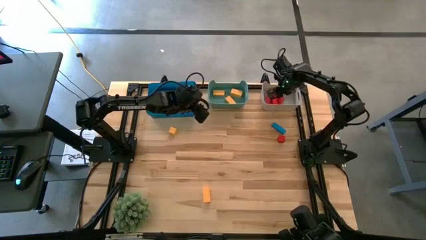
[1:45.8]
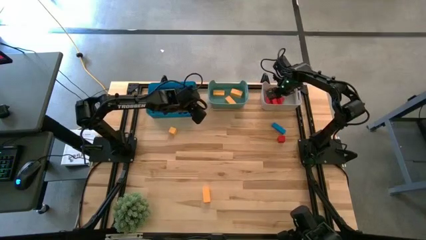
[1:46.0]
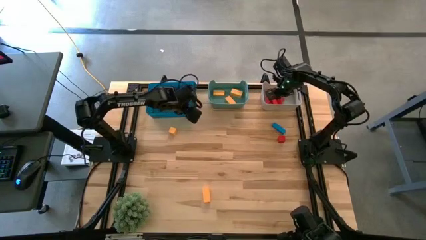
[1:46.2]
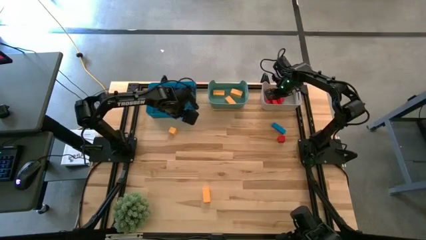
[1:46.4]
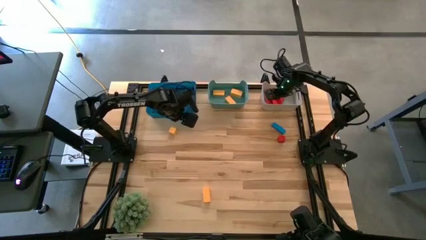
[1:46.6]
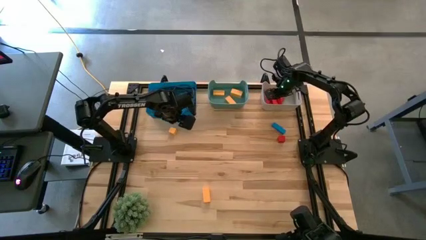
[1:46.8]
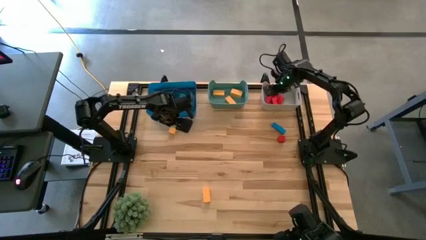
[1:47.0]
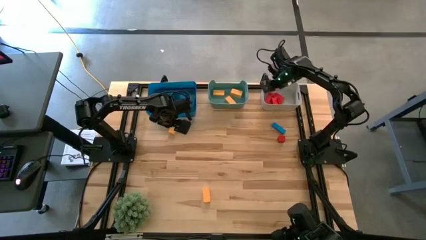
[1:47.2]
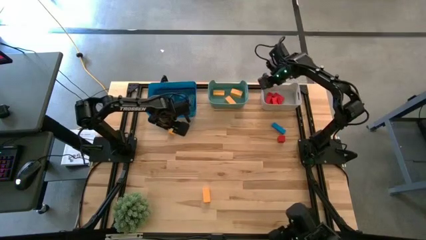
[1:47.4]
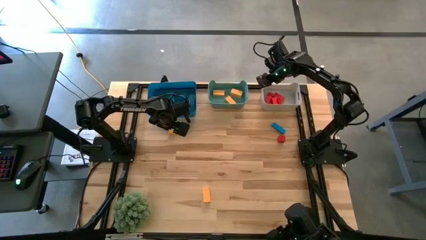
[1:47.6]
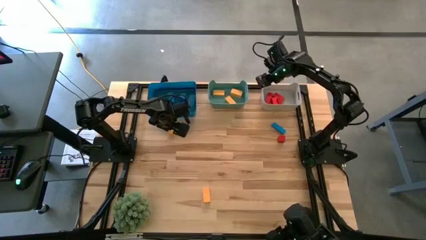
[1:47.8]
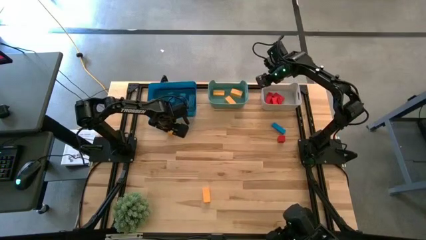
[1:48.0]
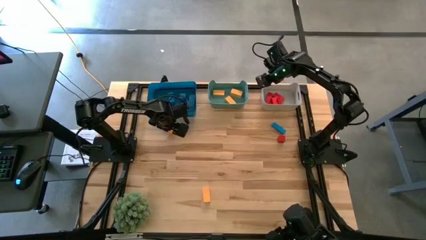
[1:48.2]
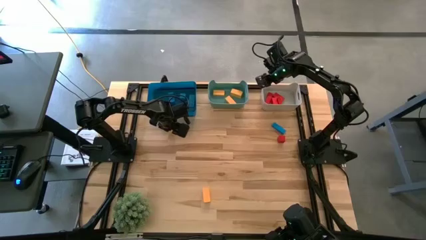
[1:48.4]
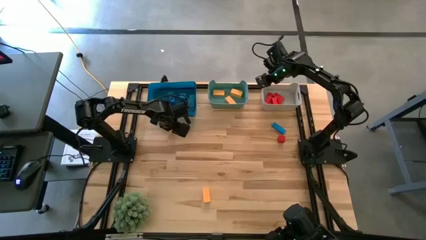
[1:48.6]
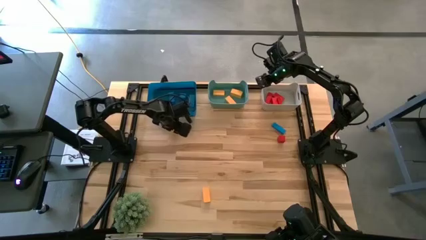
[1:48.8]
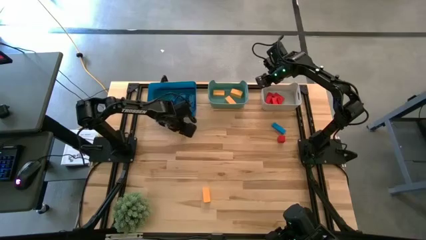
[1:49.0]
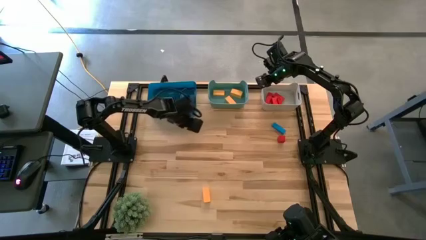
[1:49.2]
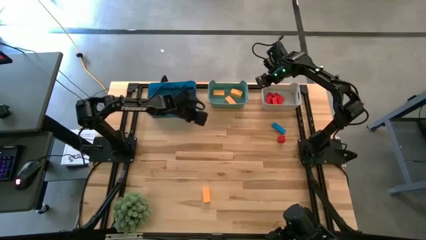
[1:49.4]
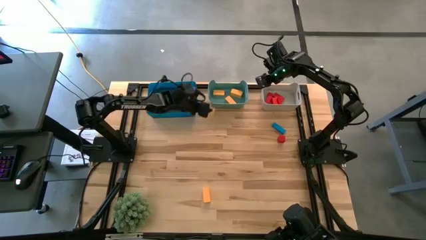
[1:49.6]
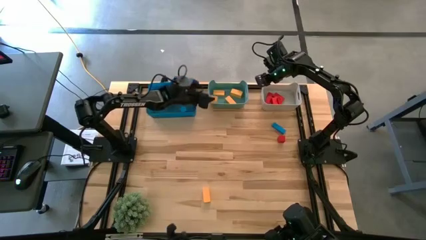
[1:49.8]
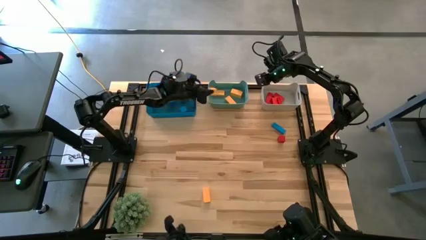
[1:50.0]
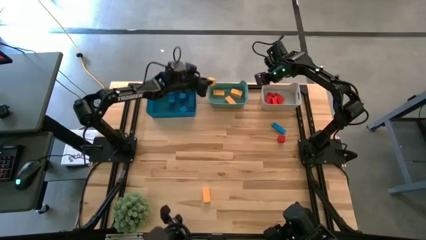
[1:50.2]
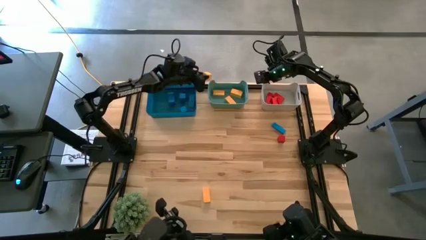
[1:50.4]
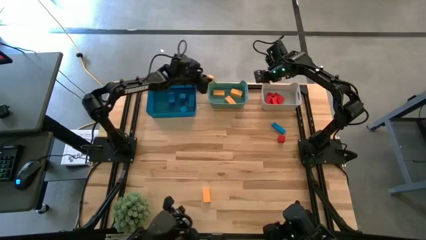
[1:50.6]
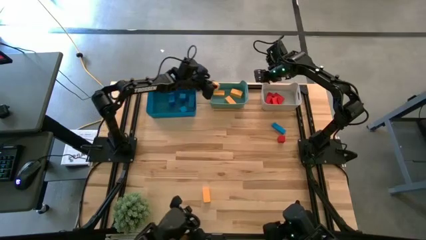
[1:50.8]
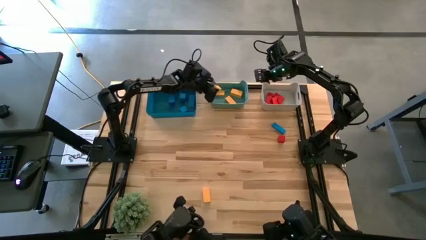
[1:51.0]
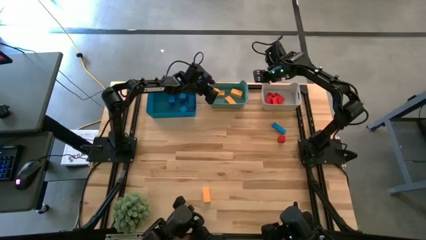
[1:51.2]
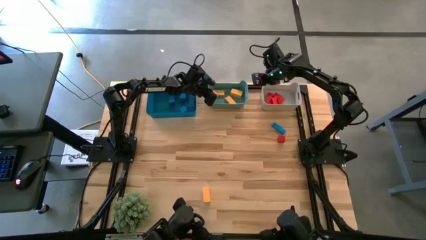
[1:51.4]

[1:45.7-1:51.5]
Task: Sort & place blocks by color
Put the yellow block into the green bin

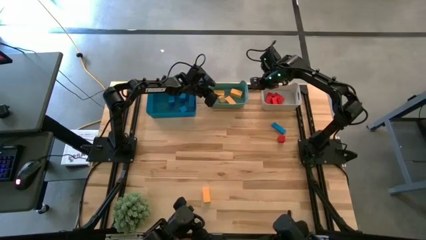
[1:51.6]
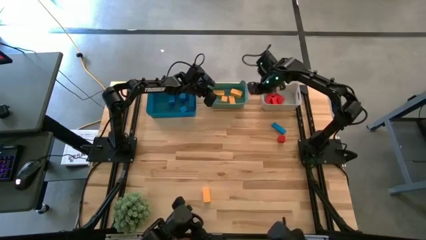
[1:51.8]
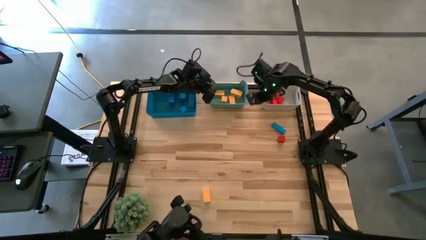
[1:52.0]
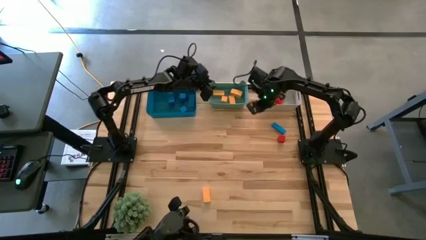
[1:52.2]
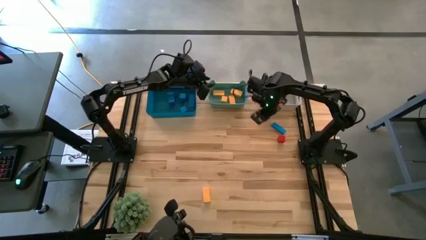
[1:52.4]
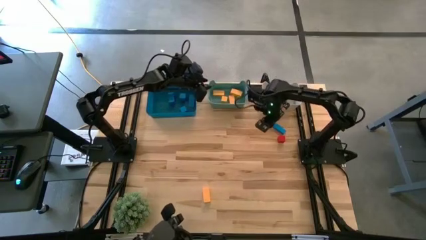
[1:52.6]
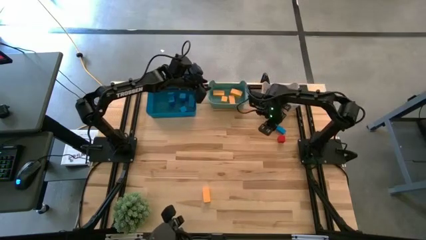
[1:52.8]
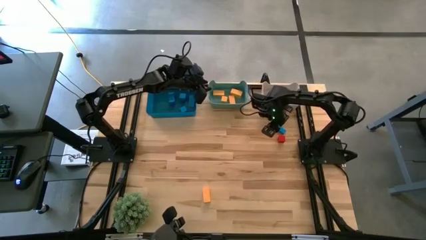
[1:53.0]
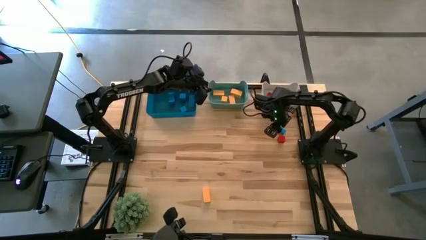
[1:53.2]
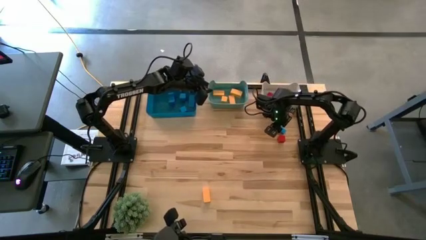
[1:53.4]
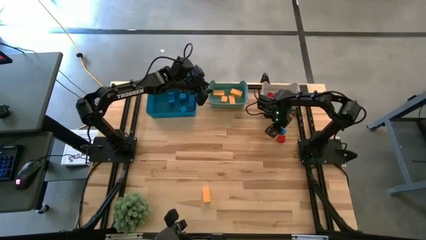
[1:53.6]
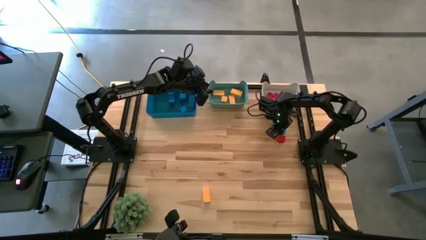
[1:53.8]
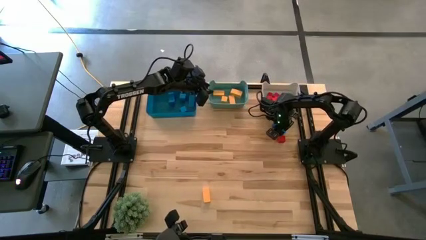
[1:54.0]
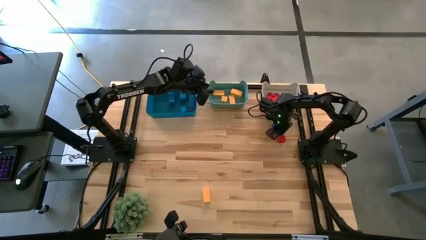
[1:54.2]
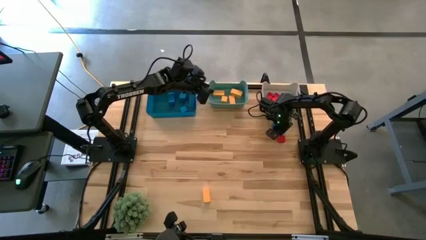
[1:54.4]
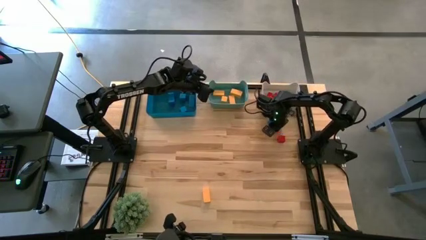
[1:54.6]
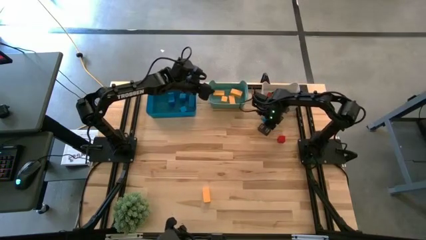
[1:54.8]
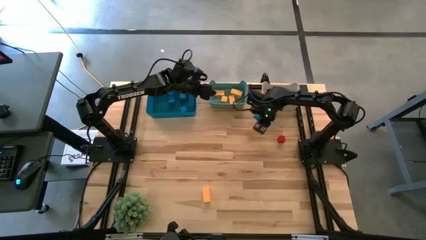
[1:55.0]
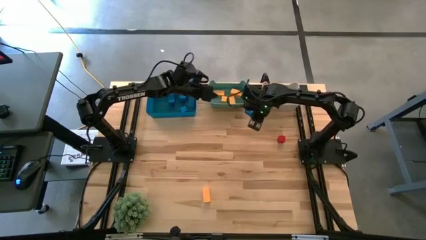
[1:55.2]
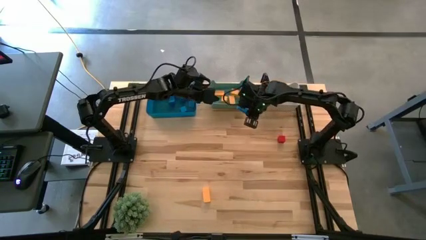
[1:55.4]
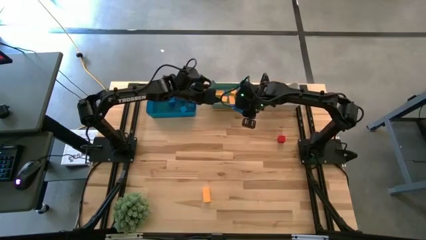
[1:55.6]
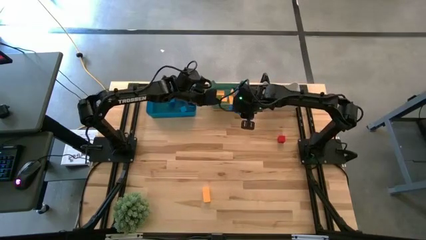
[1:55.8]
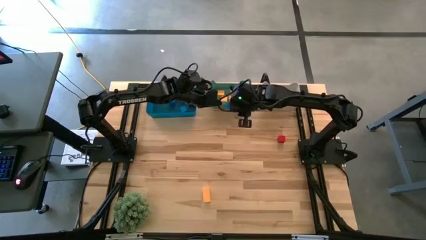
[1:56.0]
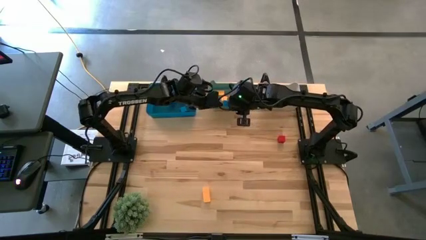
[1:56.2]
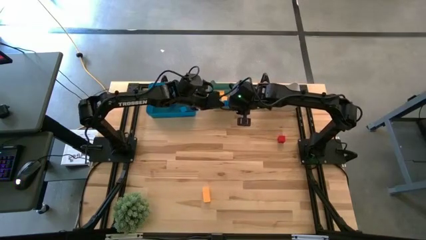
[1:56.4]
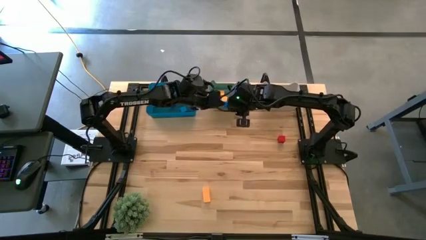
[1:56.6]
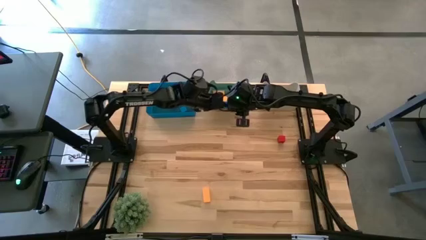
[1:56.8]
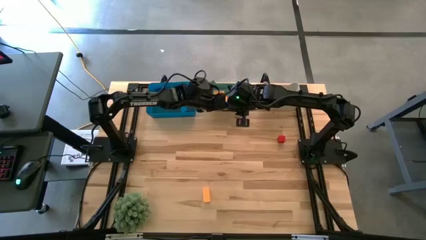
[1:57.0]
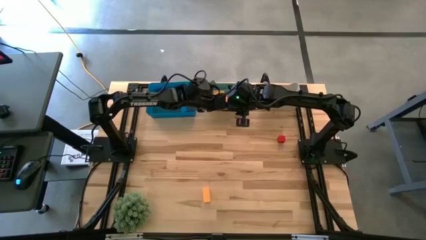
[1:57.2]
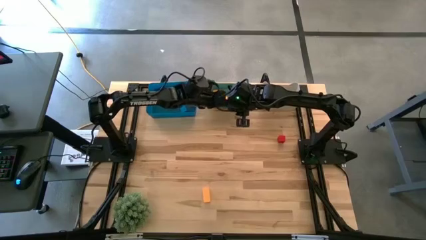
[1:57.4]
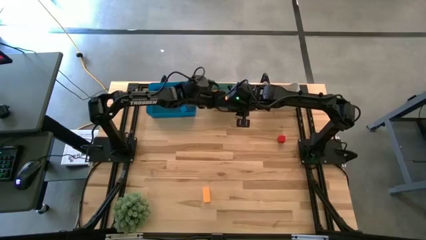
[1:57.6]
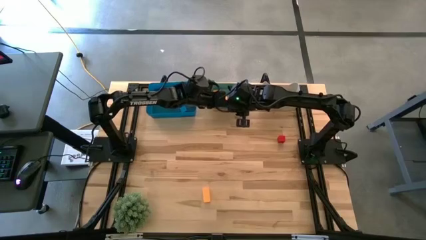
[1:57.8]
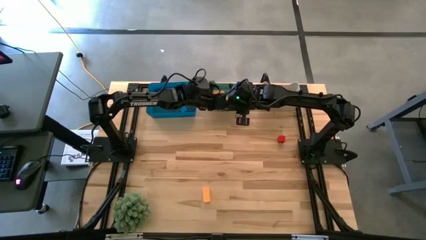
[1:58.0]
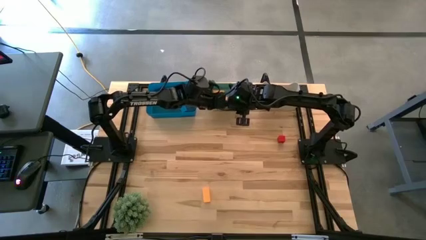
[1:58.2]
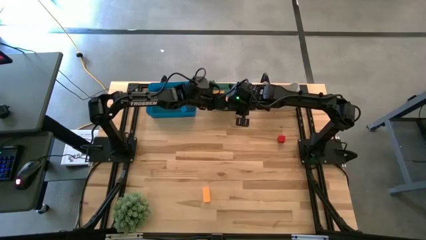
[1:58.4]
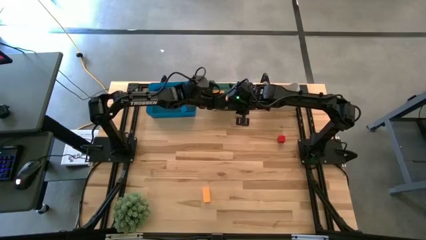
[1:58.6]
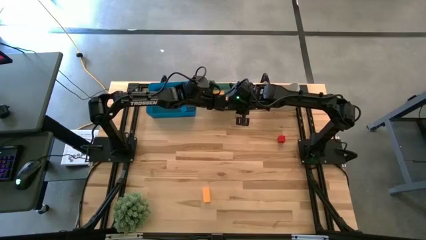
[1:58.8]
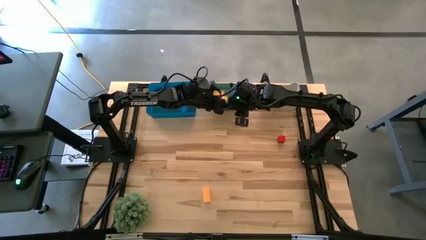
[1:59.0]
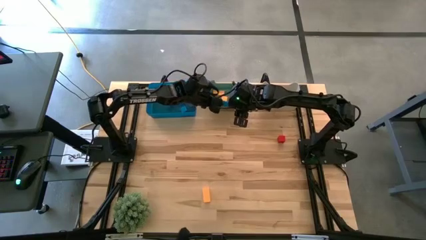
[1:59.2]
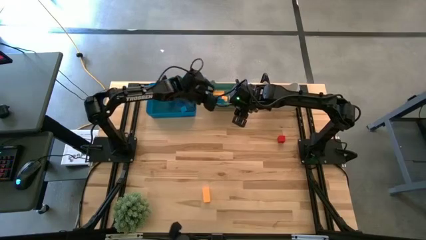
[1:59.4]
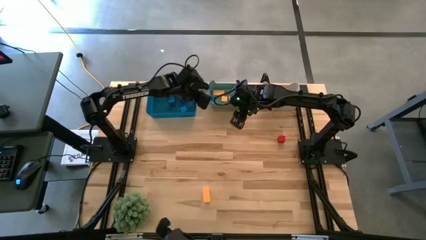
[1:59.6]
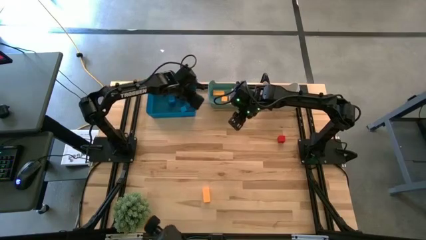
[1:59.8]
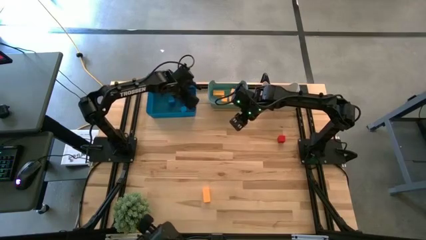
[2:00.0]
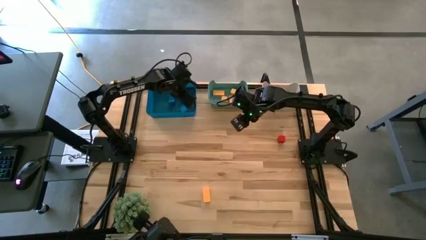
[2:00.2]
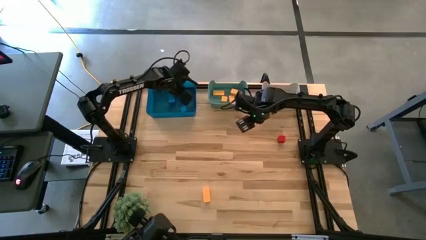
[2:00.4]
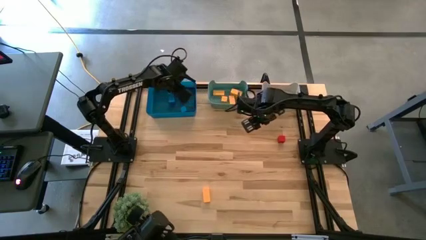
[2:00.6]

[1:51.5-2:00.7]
Put the blue block into the blue bin

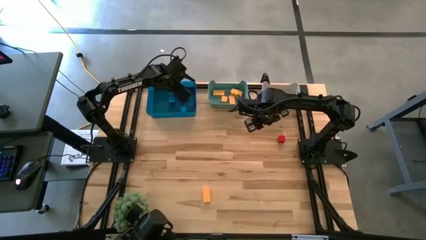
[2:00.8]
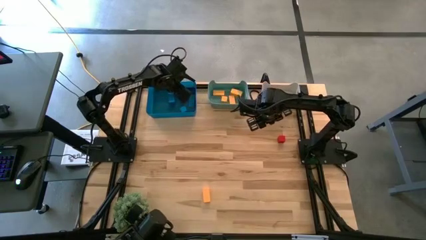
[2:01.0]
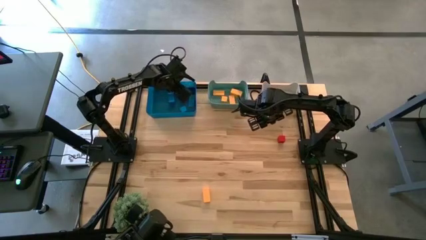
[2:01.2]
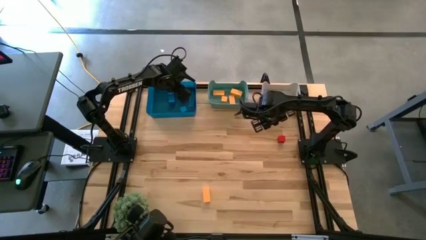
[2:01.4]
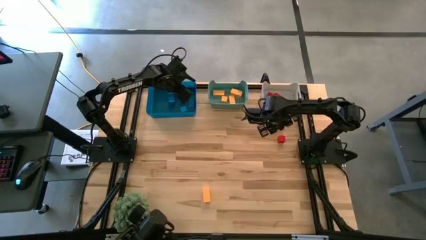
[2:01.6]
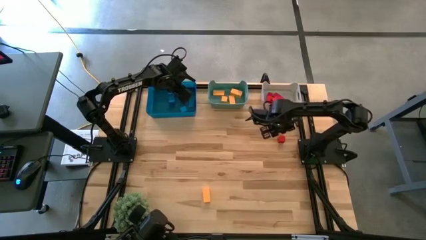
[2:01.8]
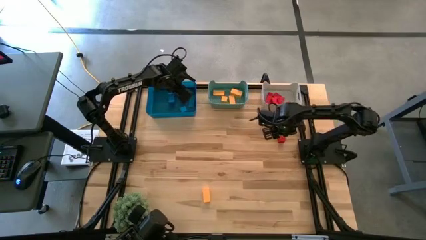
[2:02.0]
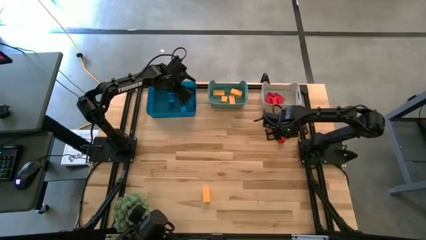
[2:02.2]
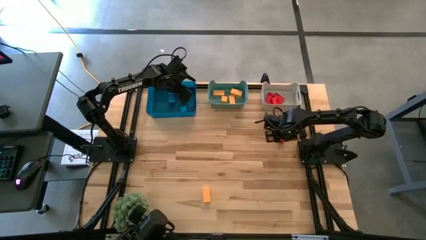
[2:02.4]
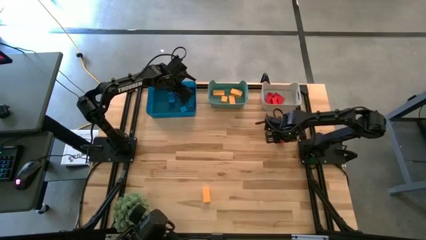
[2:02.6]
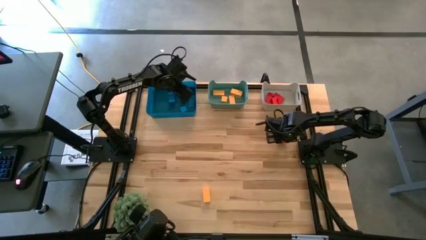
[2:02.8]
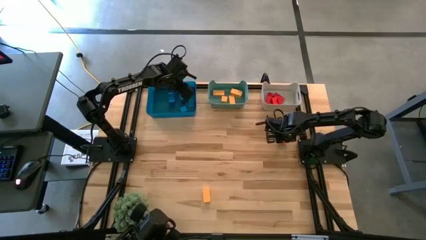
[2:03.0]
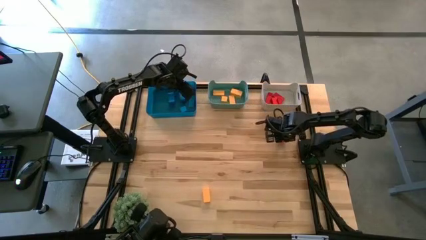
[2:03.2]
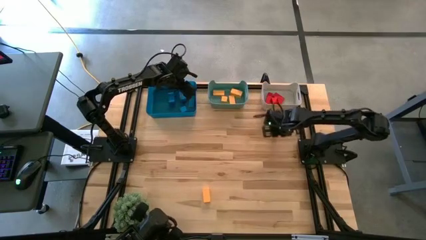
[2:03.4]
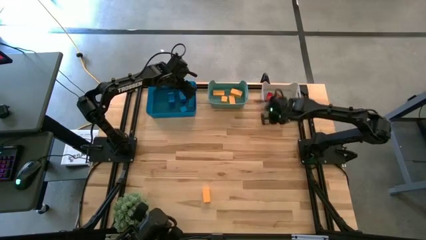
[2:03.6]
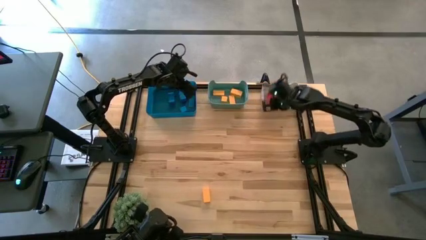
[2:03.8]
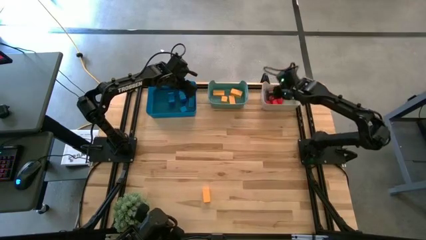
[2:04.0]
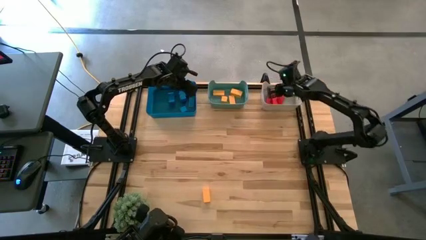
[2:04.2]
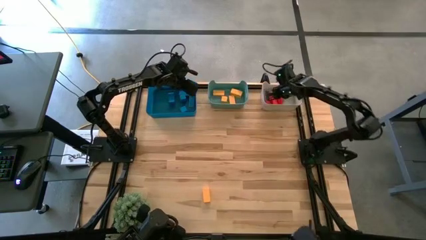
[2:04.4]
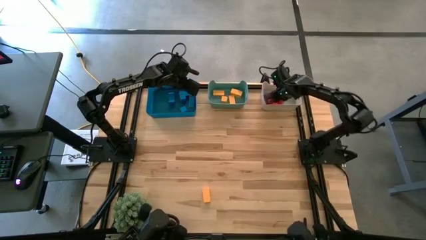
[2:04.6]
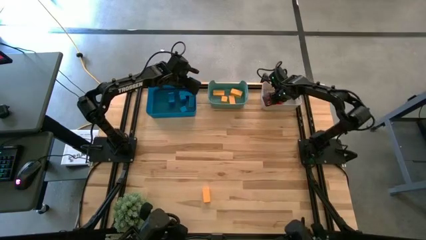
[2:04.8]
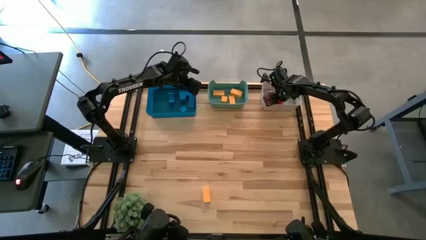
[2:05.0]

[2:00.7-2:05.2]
Put the red block into the grey bin
